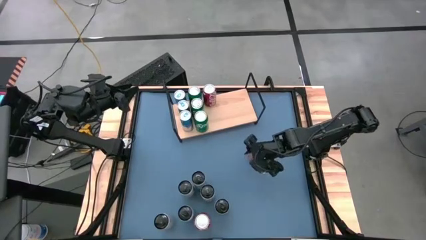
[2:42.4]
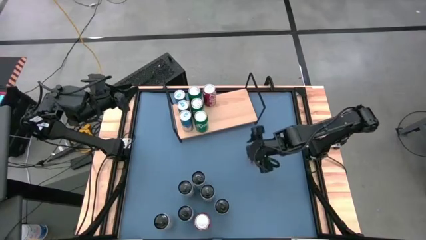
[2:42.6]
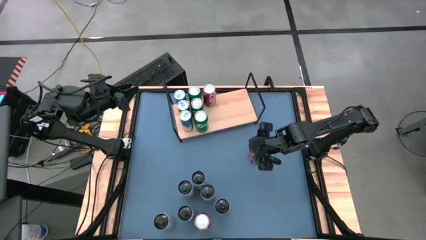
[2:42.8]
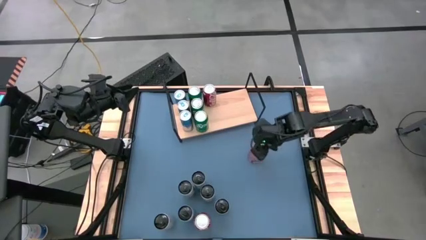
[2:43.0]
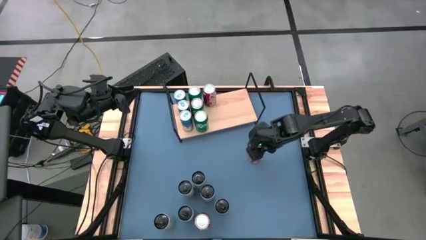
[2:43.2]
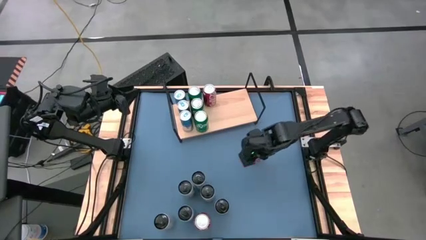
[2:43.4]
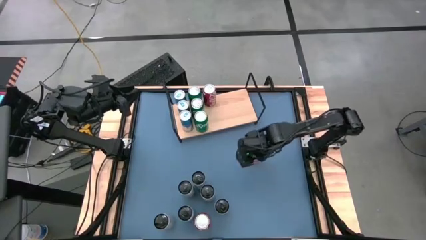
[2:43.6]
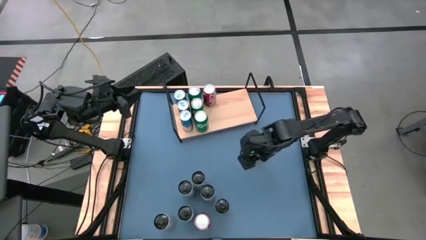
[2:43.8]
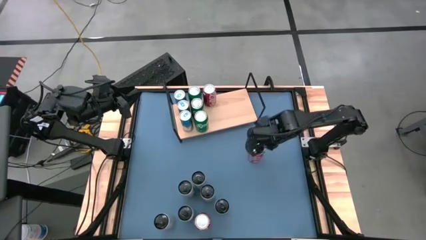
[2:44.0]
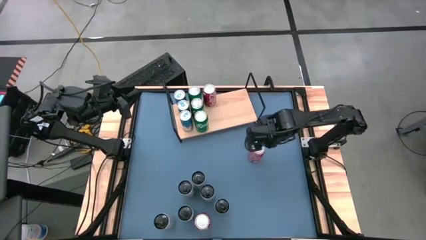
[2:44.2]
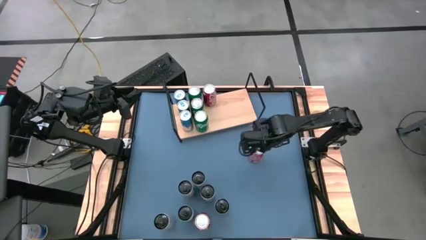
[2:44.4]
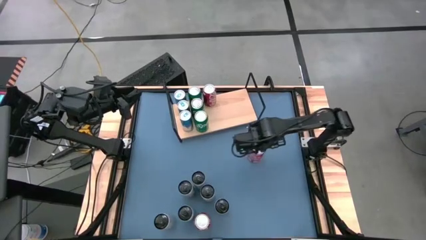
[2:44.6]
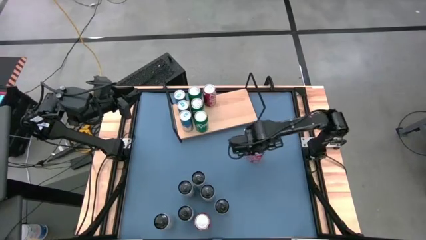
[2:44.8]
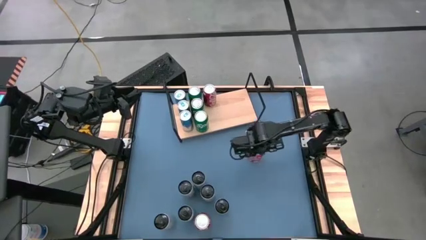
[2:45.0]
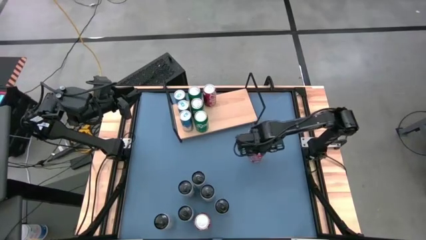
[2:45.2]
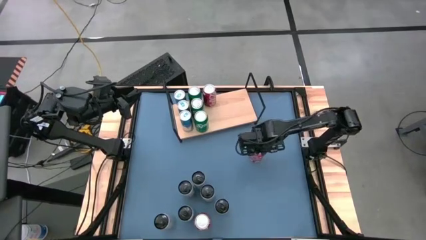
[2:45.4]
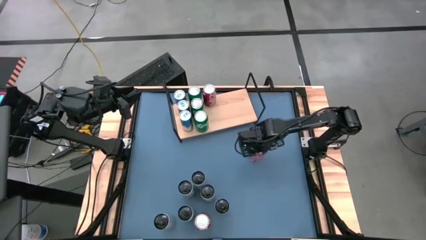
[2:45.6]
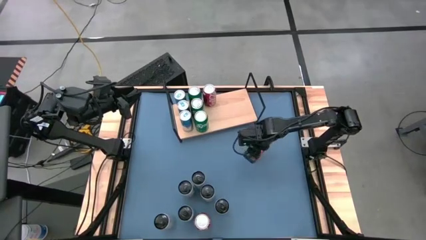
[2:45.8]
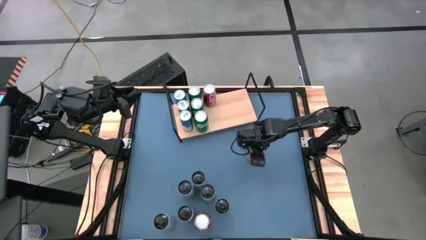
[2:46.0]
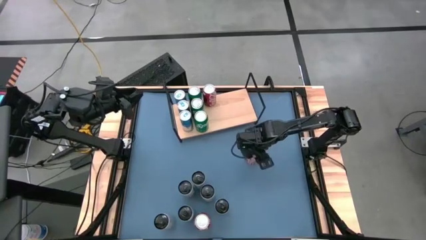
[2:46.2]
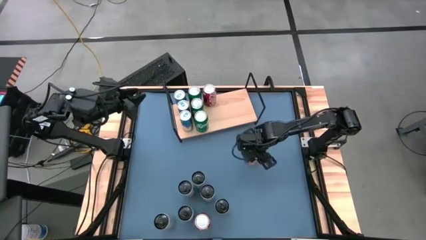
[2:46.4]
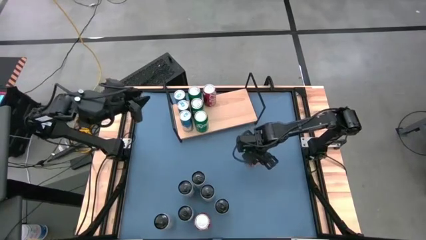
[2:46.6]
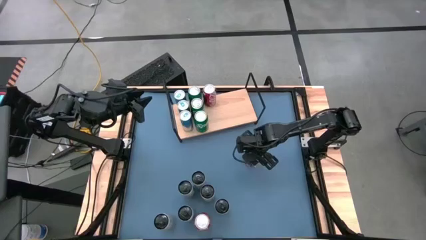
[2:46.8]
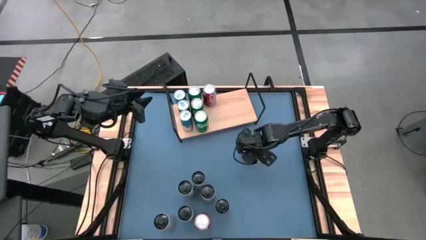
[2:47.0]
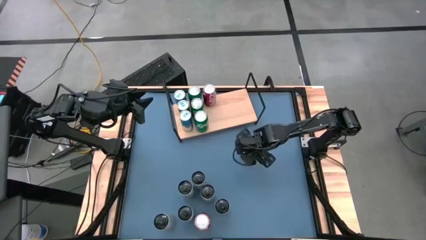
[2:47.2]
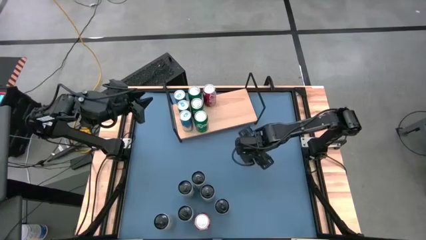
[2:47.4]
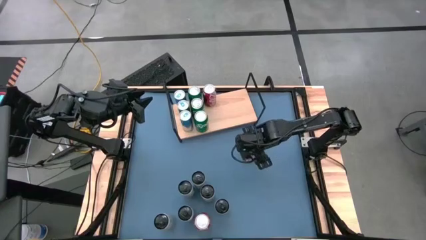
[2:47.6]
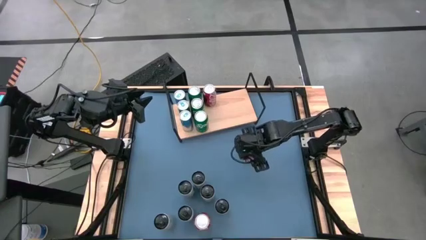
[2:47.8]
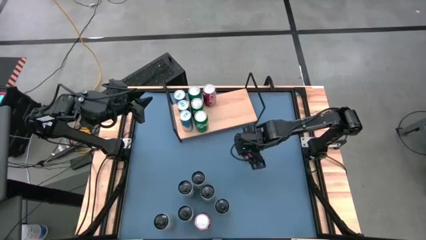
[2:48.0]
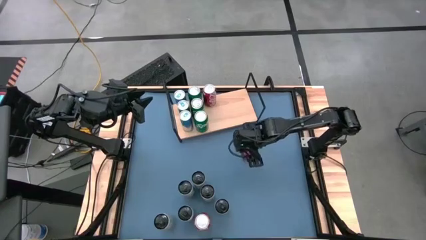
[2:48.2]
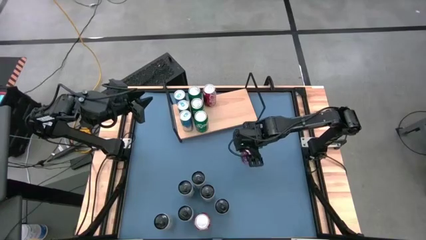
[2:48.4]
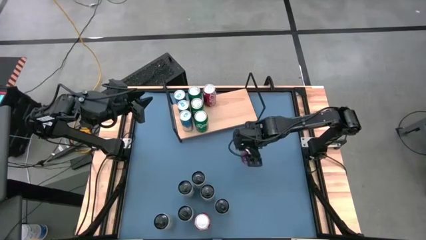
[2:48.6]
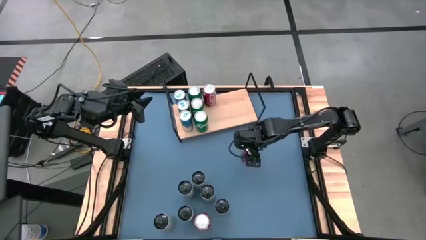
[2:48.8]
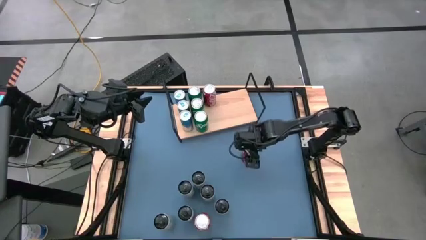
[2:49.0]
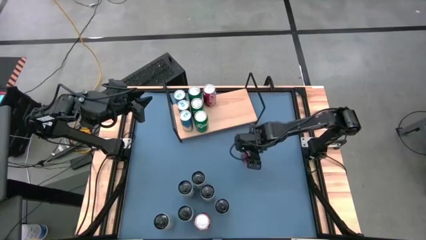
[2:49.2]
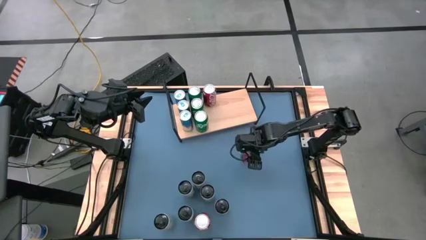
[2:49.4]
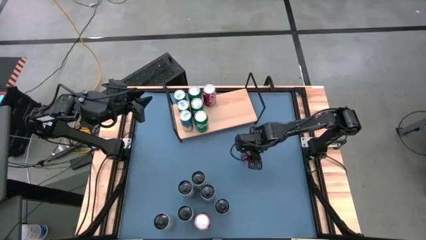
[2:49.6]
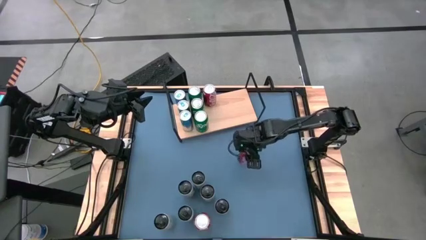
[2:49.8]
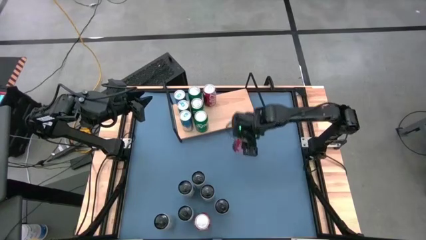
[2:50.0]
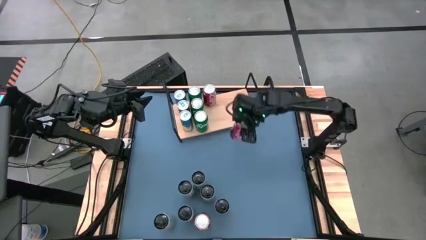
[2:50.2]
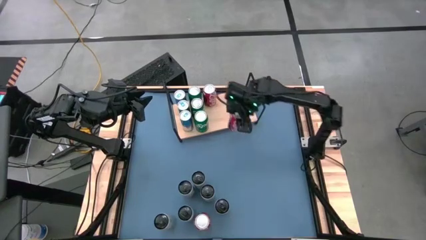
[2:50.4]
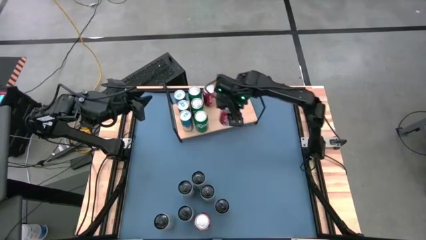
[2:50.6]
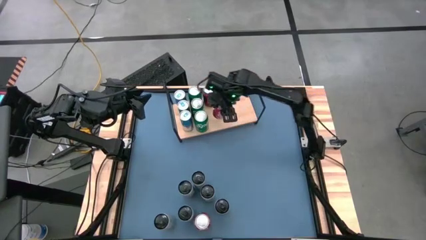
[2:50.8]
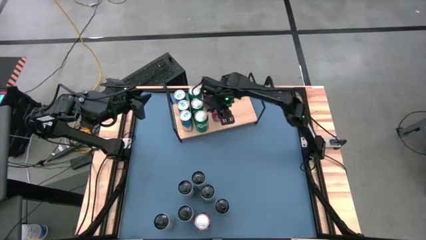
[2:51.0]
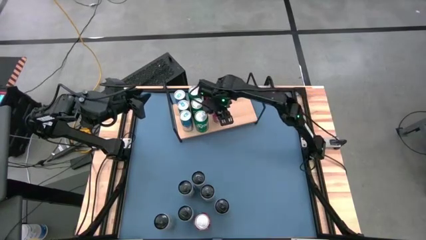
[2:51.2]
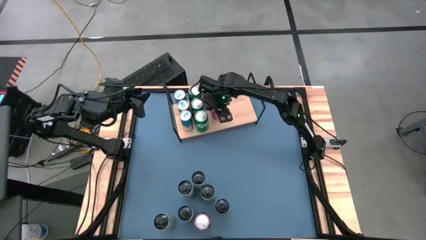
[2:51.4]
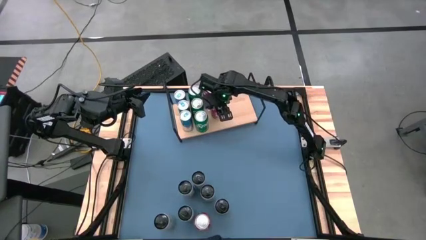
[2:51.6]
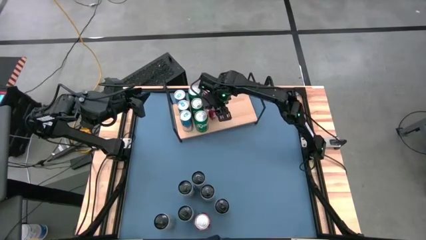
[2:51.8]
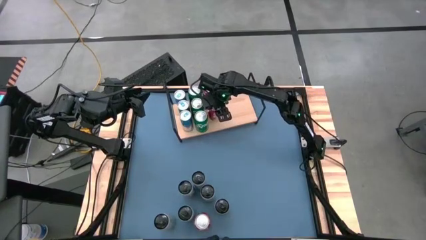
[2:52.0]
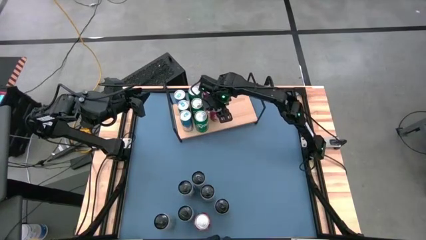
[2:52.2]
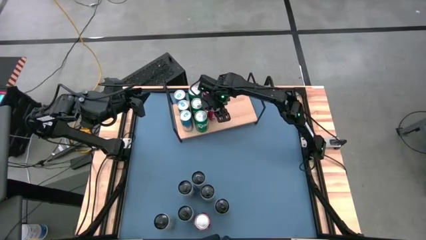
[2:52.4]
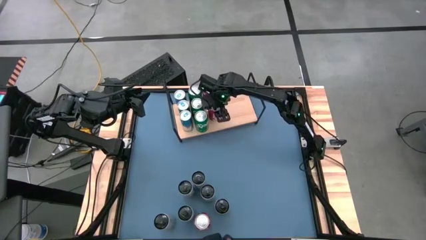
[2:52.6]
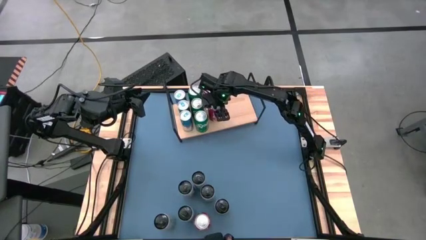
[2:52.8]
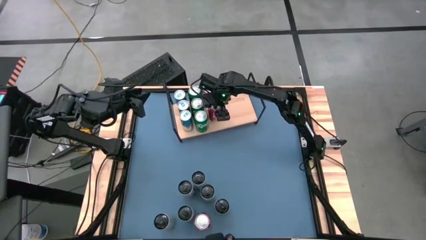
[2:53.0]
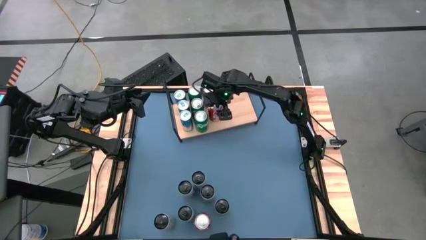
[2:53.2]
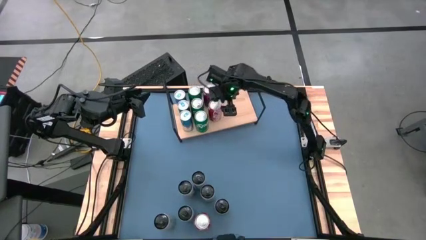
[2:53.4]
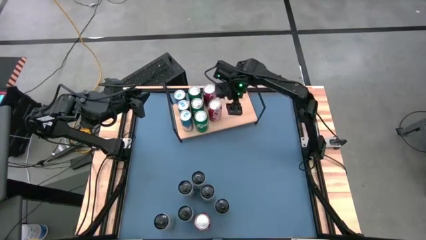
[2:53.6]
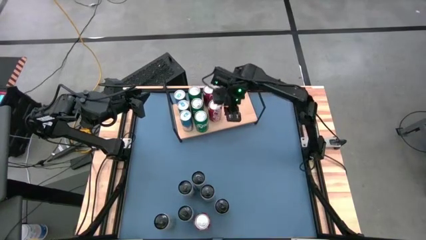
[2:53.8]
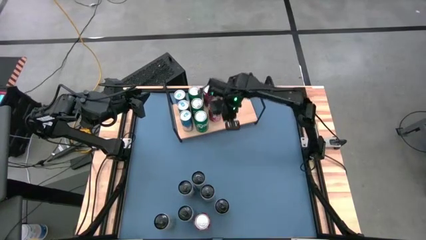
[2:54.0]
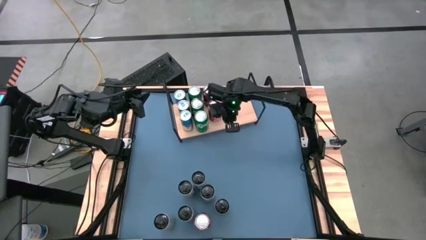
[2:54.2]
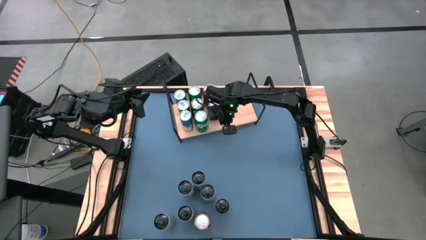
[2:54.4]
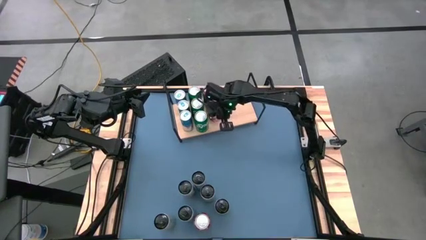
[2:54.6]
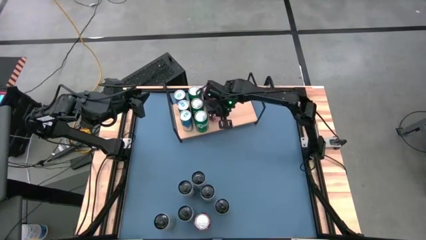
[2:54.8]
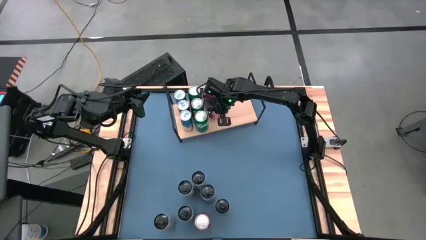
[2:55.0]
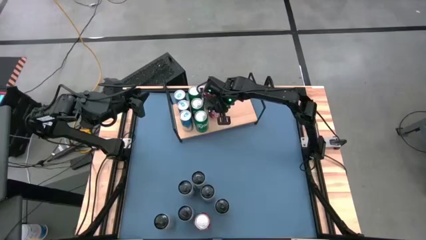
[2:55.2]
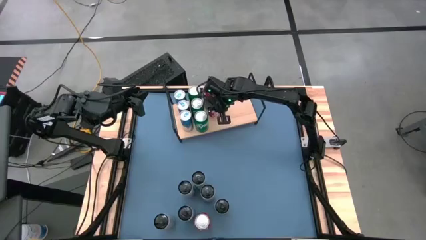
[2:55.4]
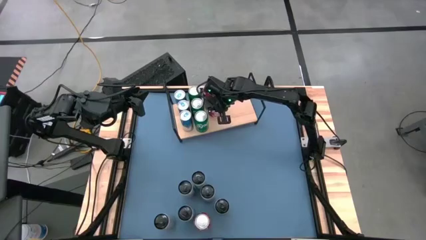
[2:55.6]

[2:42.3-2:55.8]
Task: Place canned beverage on shelf
Put the top red soda can on the shelf aligned with the other red soda can
